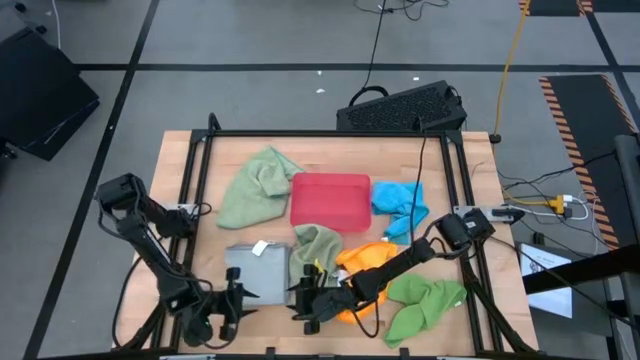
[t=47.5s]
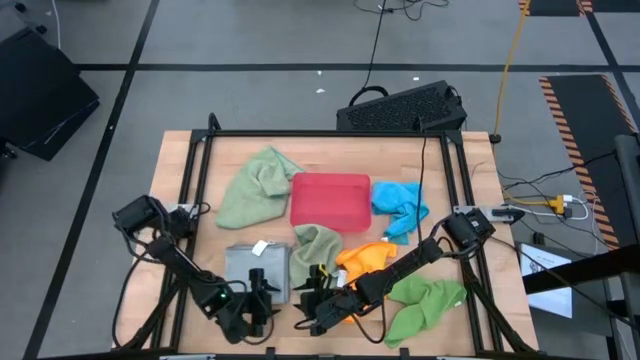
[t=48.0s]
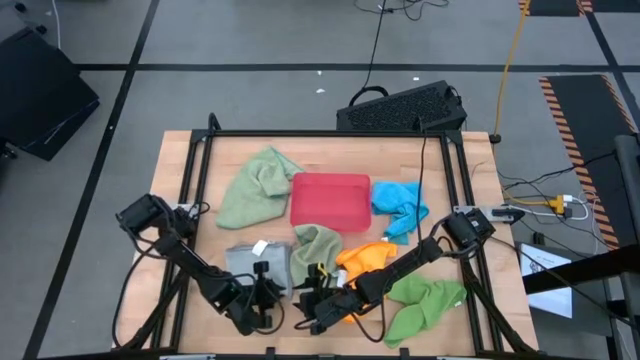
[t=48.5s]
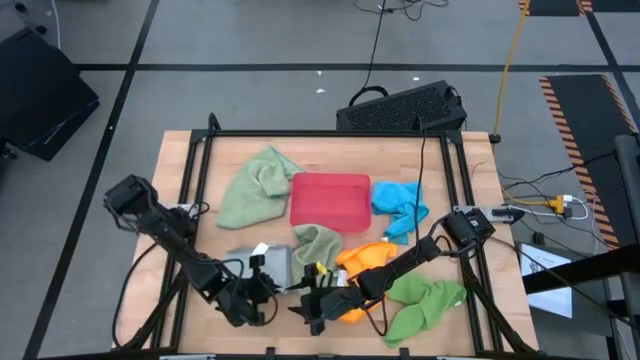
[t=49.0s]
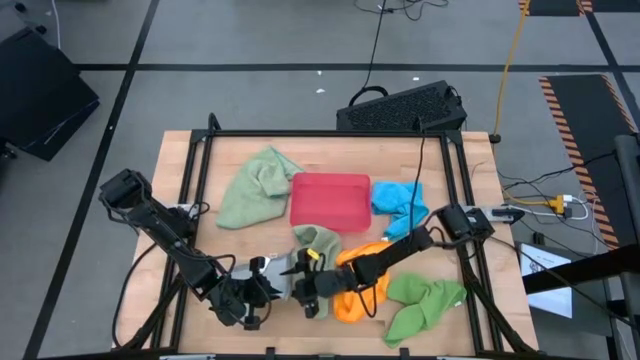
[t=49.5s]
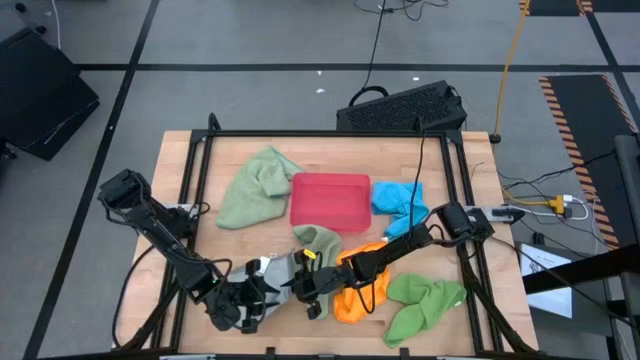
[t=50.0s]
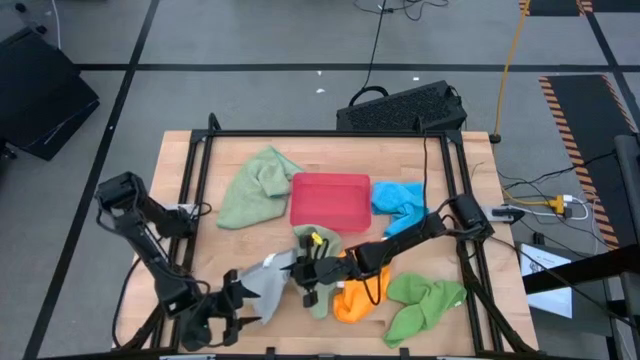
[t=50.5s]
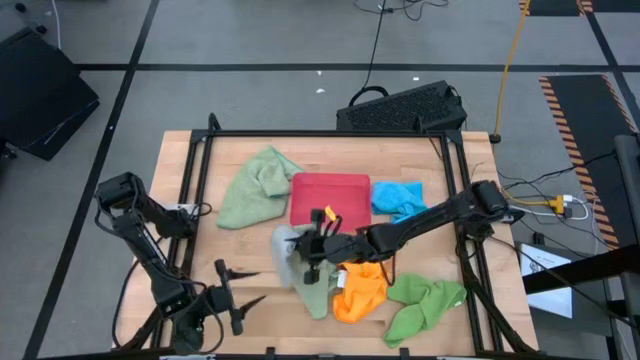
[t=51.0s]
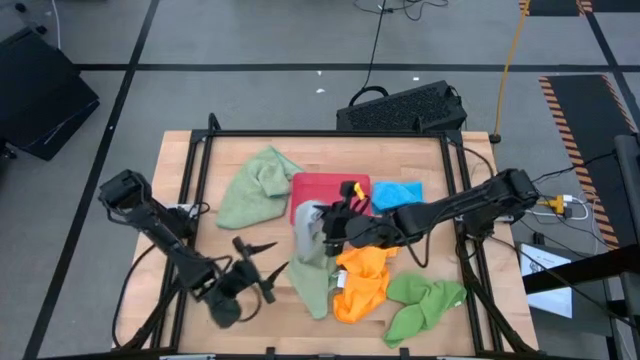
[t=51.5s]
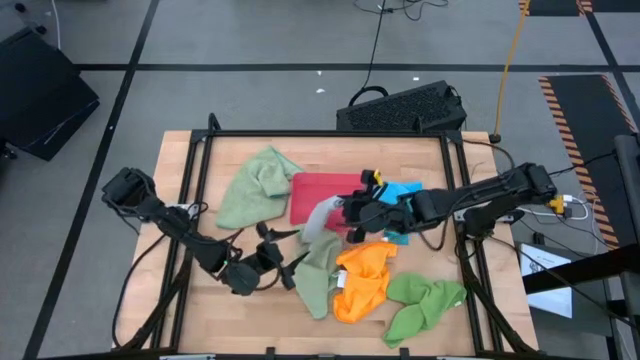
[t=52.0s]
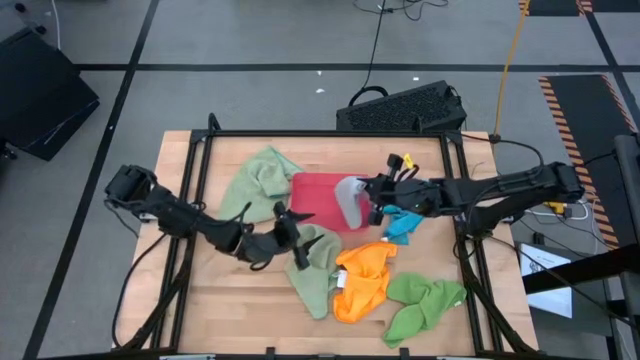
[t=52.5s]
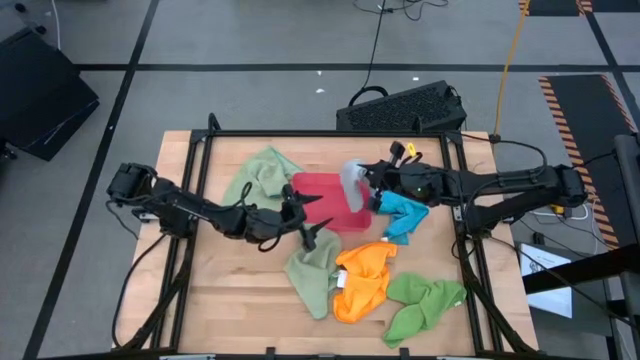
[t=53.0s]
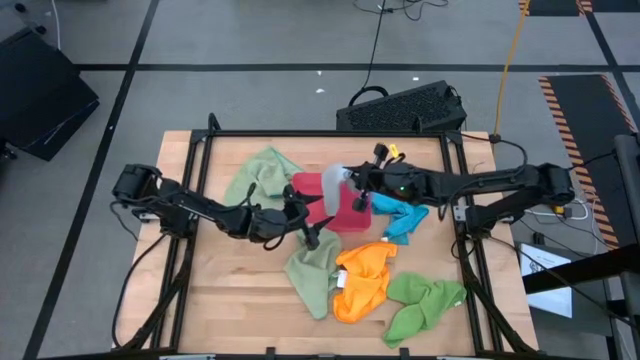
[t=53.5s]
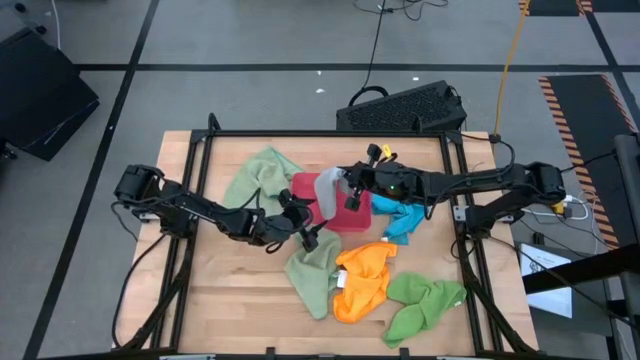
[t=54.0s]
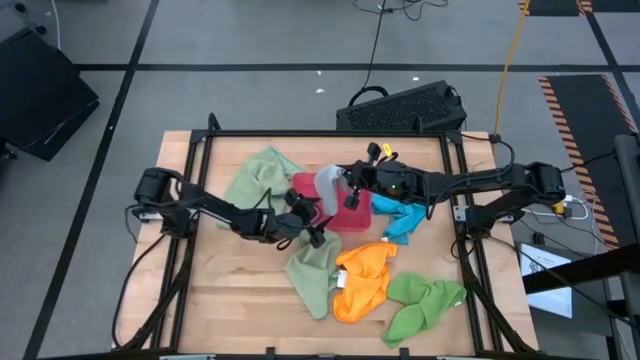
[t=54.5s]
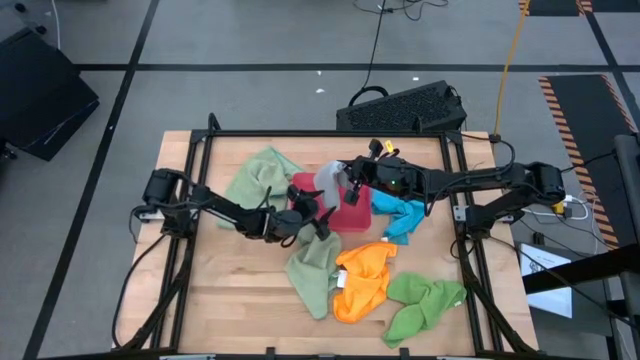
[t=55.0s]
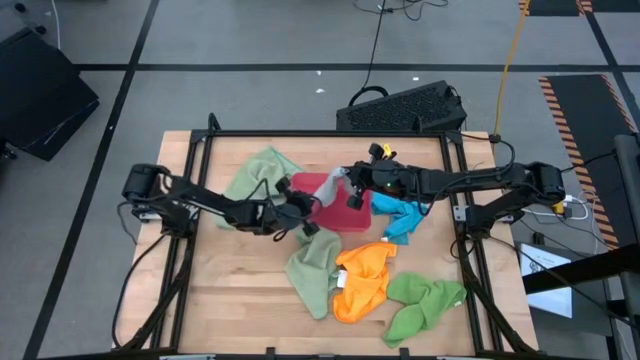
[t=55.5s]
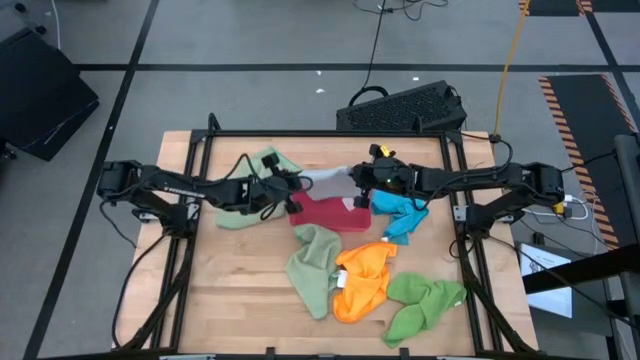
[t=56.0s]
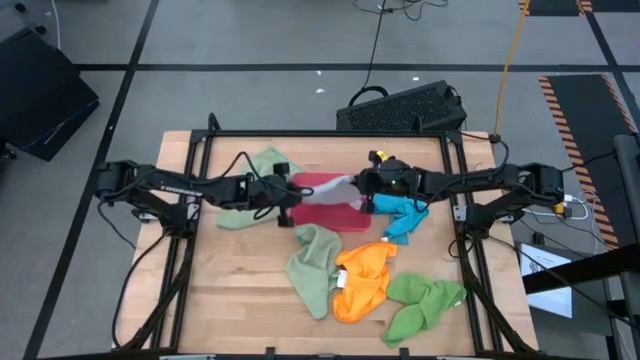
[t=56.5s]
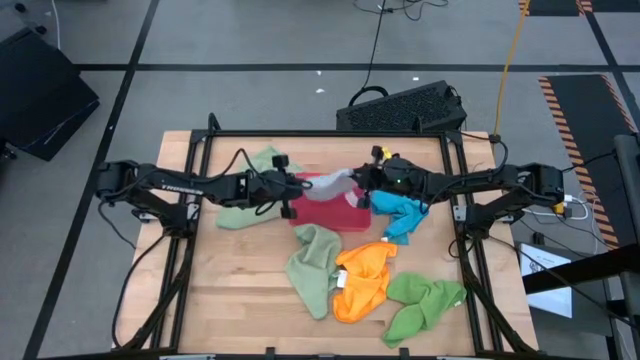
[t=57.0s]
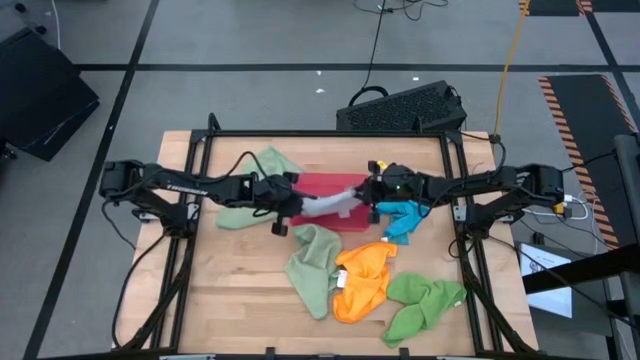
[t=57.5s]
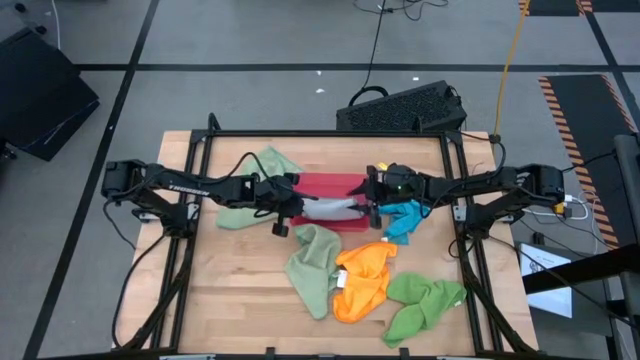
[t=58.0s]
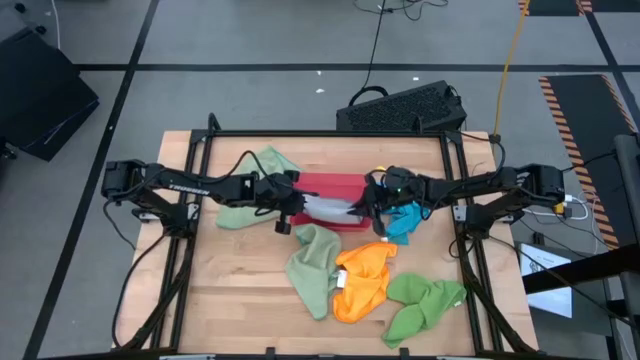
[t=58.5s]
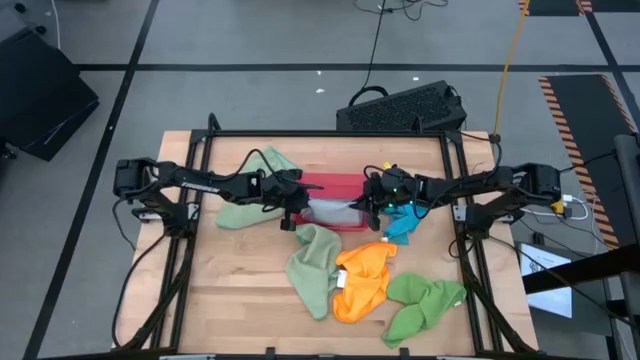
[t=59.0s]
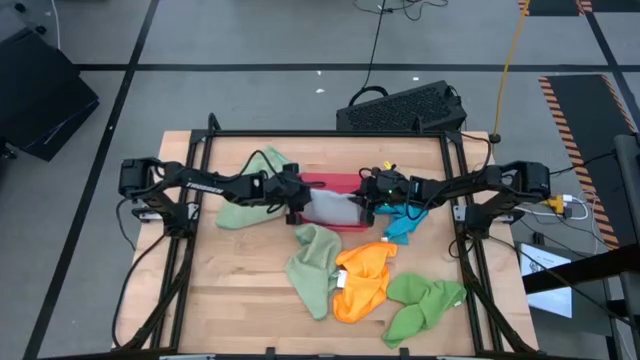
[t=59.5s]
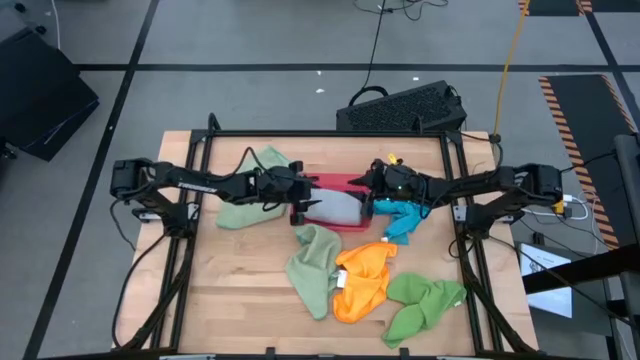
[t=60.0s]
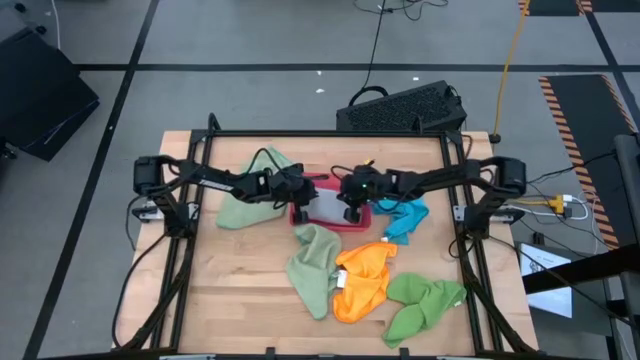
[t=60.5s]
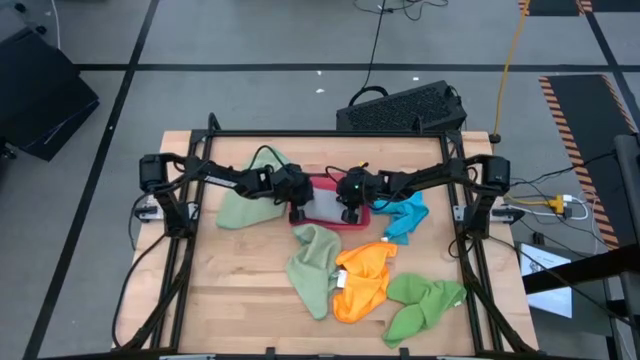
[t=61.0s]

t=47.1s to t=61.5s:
Task: Fold microfiber towels
Put the folded gray microfiber cloth into the red bin
